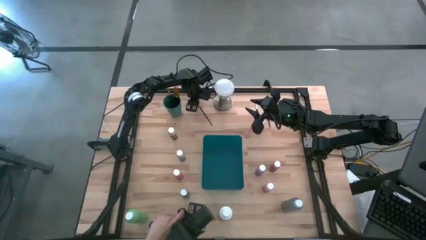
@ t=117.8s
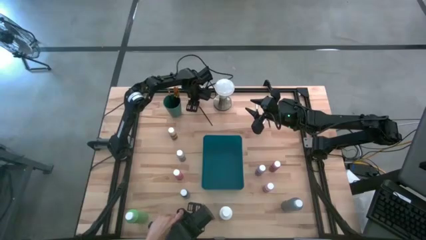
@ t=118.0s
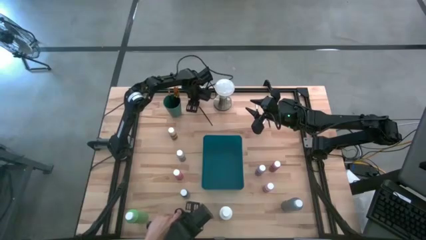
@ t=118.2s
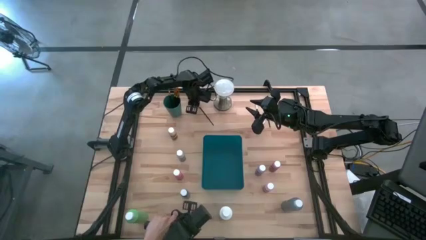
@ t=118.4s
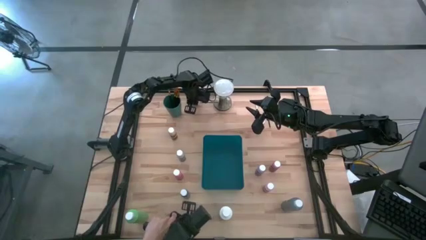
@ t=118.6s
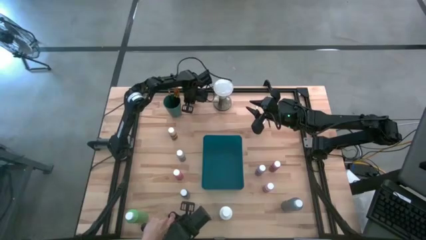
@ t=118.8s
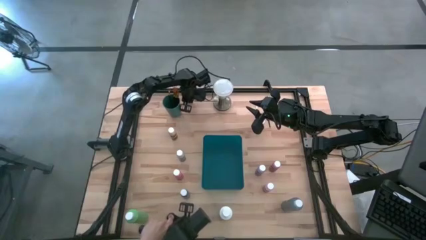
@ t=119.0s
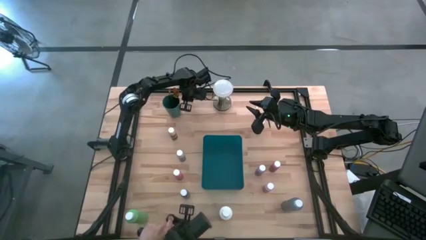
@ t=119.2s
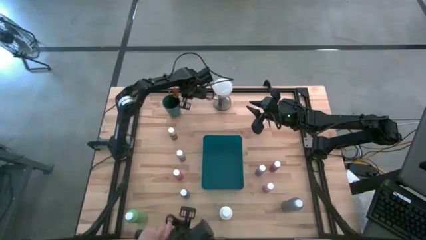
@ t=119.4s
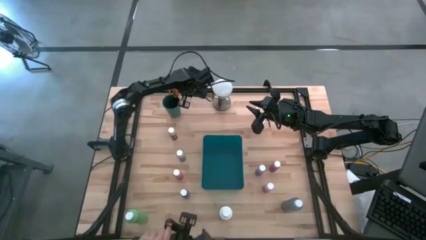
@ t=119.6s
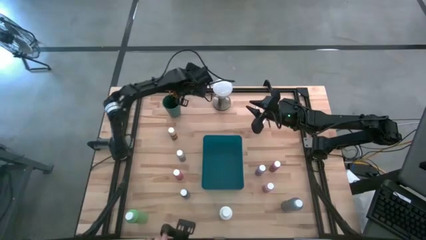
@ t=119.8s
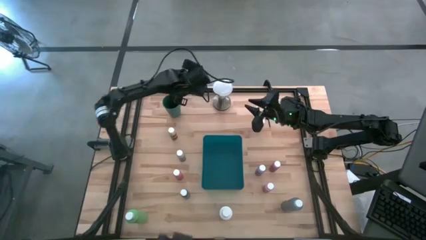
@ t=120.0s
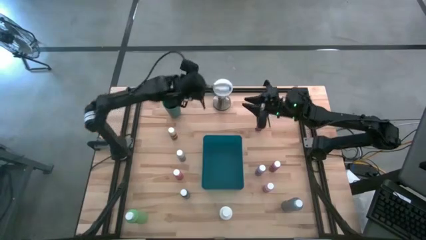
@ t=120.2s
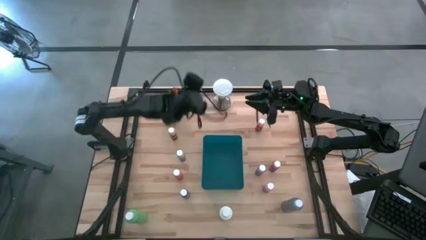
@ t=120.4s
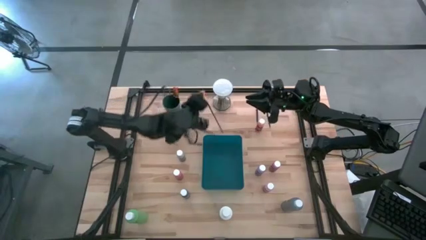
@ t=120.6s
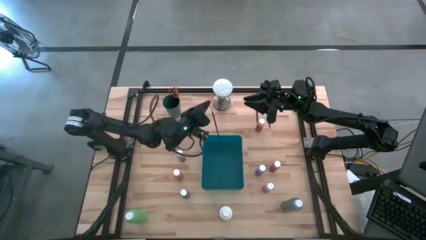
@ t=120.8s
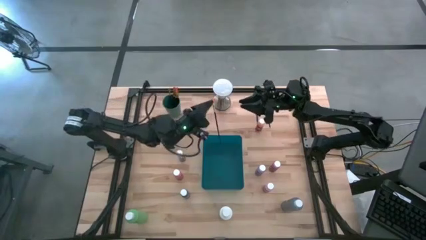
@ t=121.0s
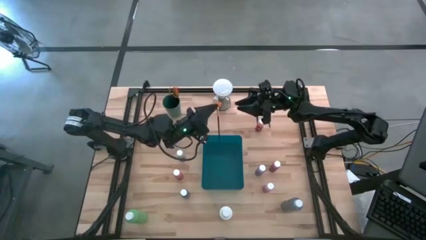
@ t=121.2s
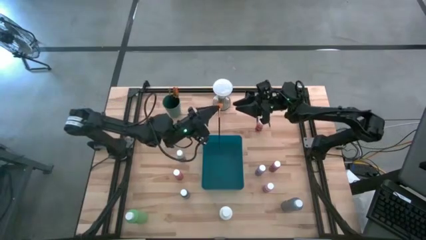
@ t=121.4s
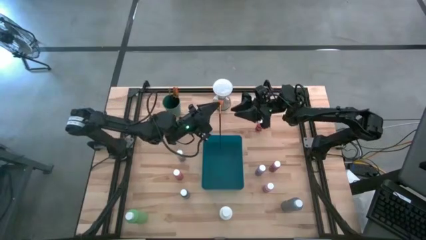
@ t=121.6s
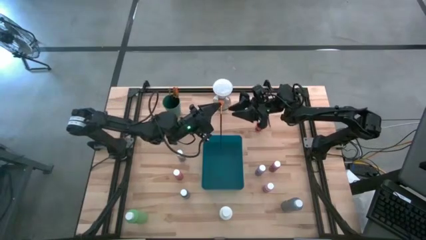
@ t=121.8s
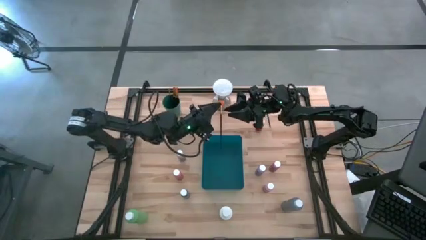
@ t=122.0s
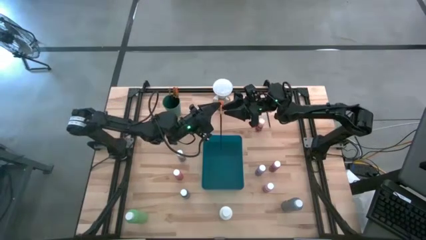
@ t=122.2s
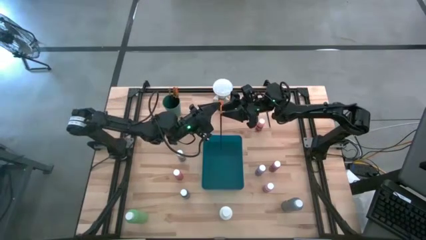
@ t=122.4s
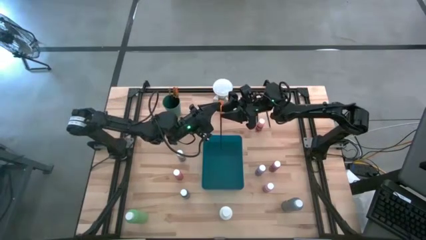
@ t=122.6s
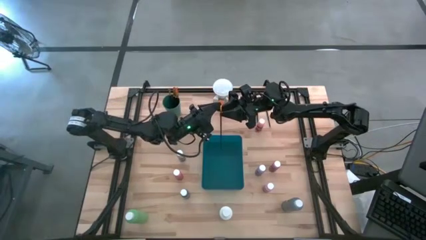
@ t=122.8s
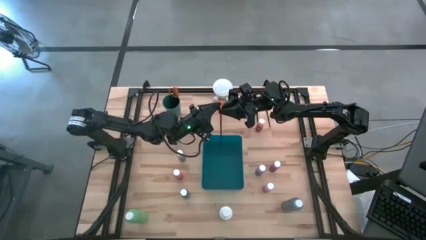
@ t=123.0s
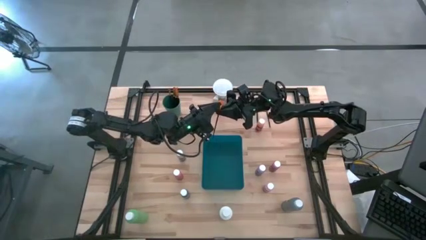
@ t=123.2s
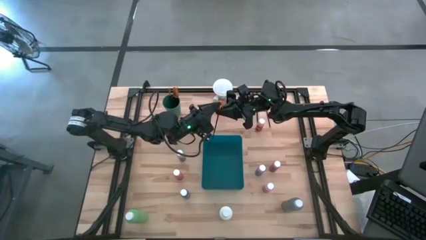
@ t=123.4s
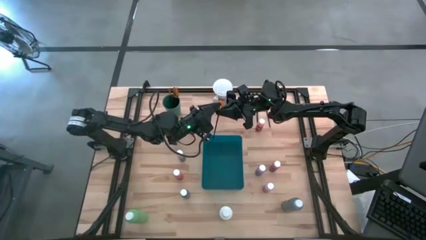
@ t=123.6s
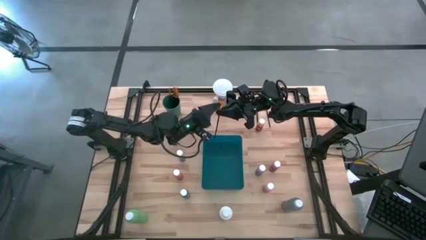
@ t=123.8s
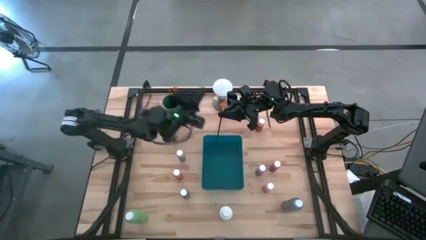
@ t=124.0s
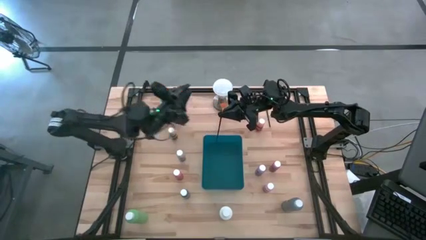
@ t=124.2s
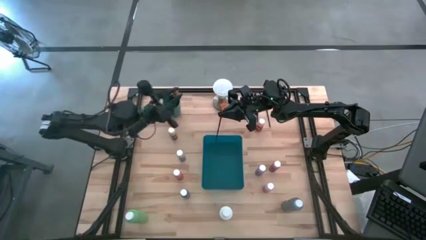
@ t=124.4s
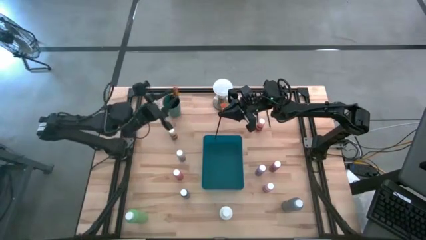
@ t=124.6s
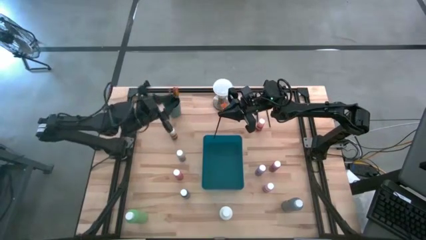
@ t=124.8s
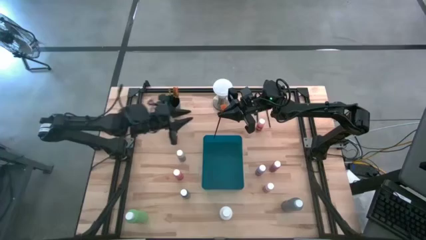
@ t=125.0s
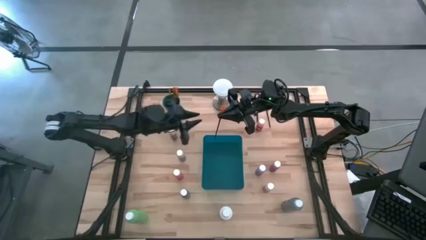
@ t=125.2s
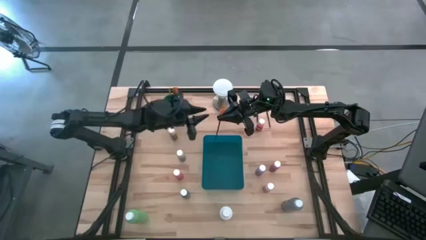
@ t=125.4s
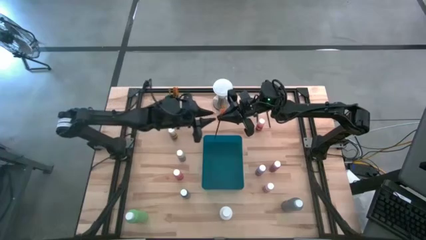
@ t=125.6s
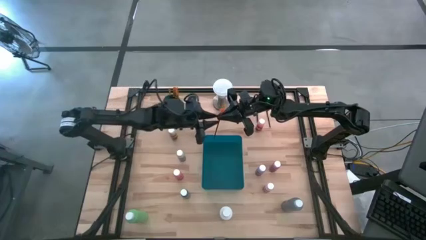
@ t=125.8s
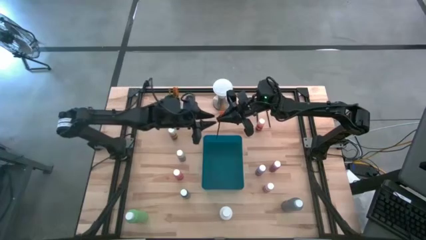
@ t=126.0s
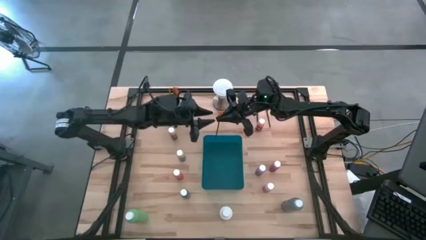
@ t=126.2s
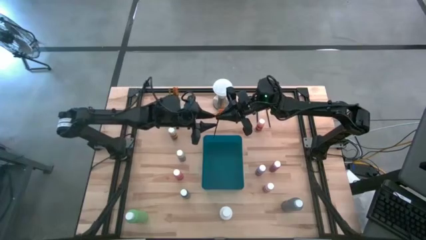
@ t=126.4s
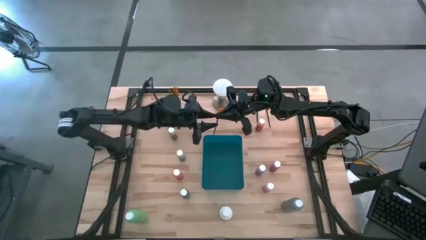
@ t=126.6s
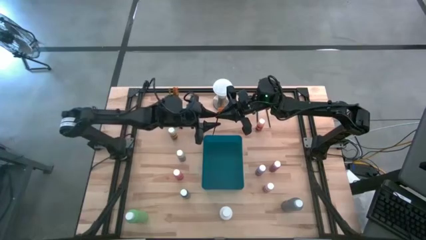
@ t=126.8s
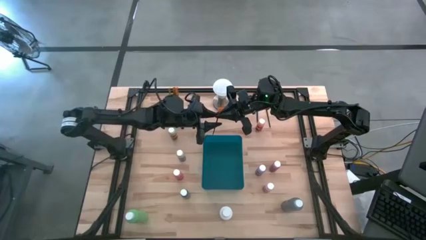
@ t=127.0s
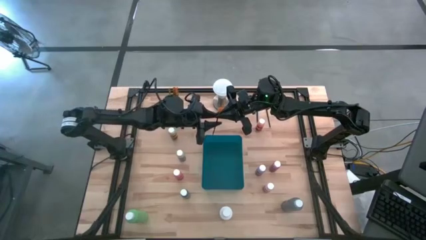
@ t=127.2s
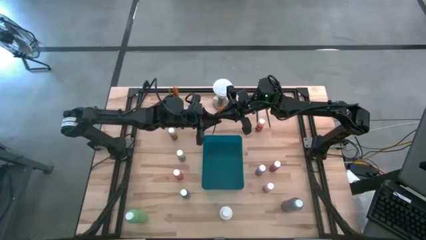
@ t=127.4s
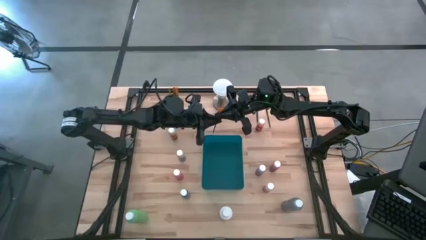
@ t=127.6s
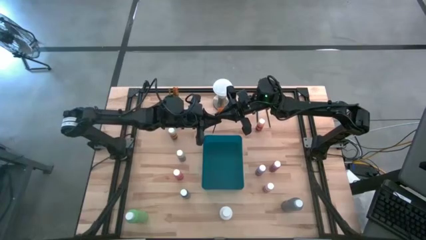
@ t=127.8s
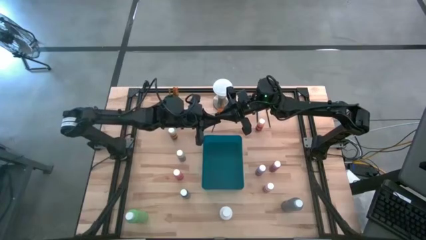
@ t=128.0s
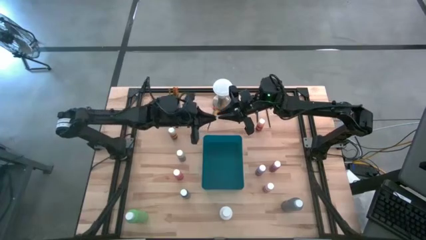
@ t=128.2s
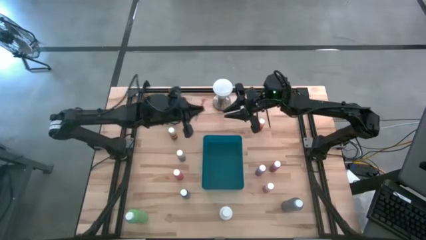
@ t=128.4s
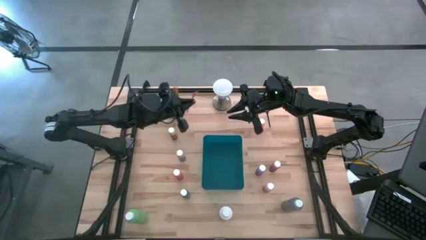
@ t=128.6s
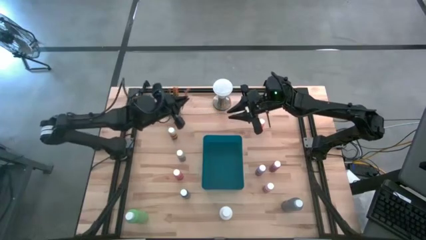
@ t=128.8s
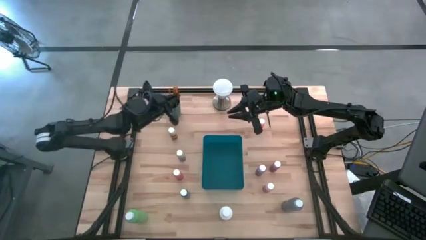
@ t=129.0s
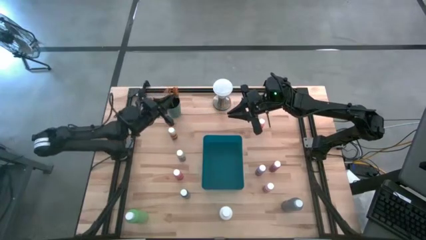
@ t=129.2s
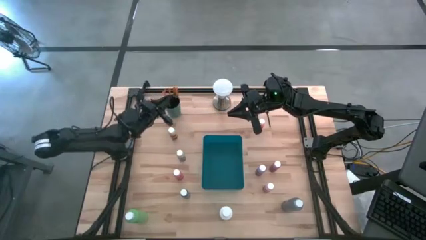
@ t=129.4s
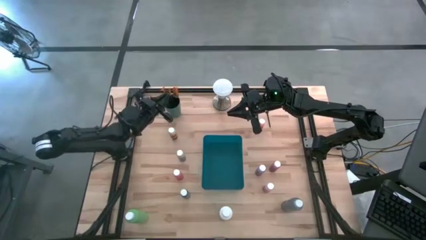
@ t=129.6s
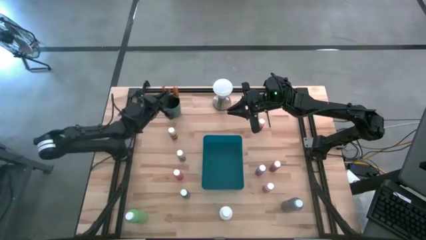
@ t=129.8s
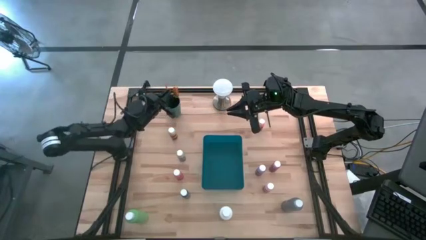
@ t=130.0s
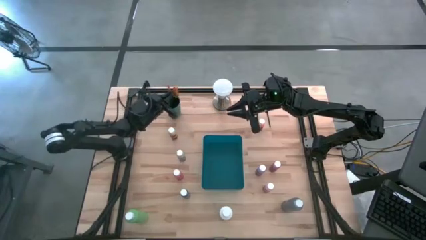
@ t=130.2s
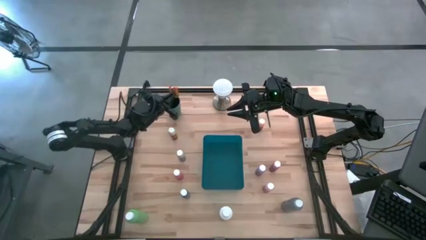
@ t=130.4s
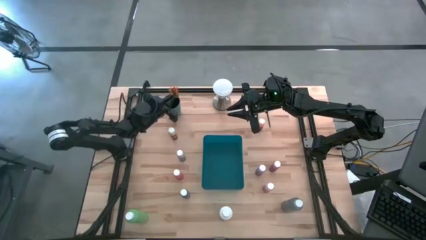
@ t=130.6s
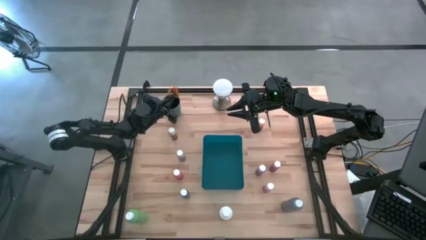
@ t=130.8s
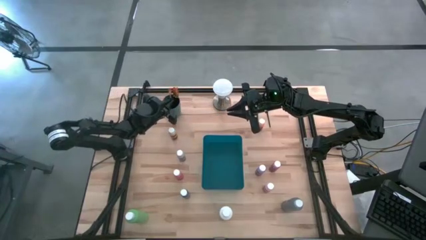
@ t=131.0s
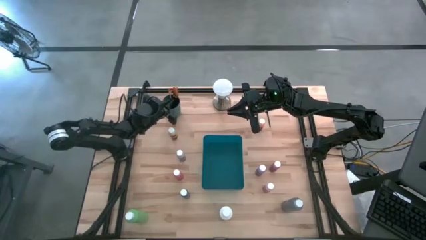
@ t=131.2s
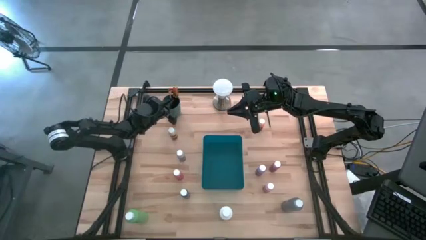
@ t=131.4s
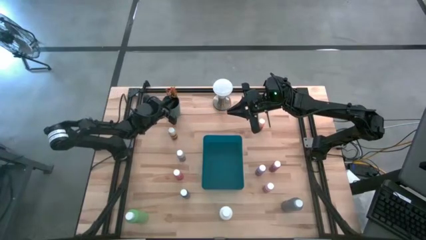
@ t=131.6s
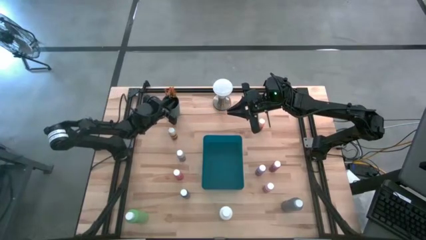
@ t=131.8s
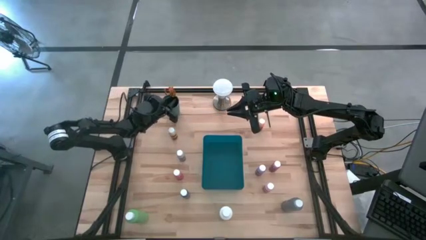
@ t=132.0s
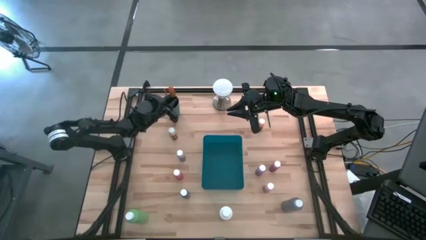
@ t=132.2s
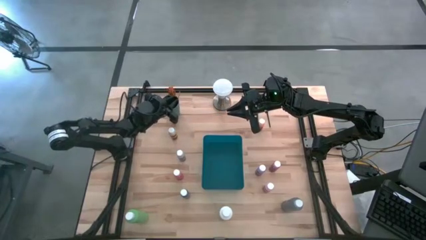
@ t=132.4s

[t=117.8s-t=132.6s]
Task: Pick & Place Paint Supplies
Put the yellow paint brush into the green cup

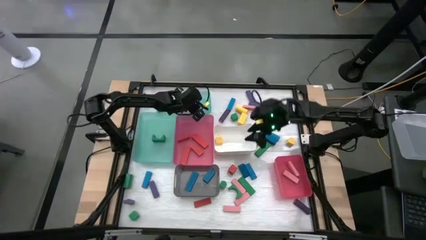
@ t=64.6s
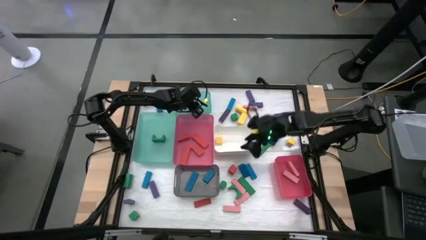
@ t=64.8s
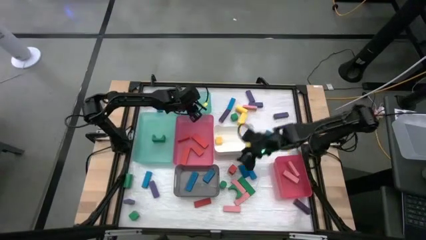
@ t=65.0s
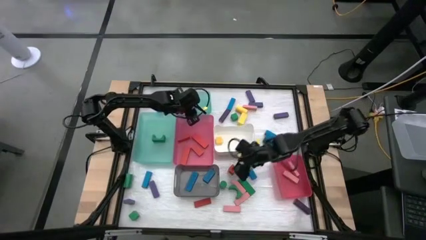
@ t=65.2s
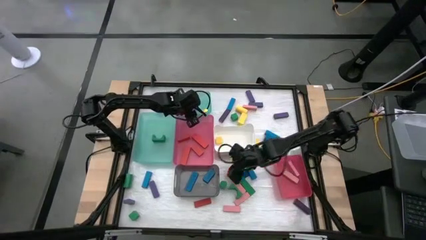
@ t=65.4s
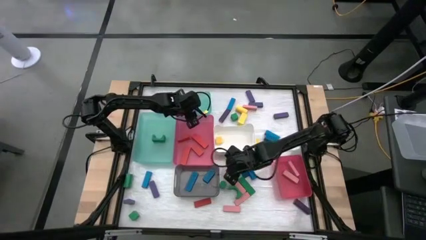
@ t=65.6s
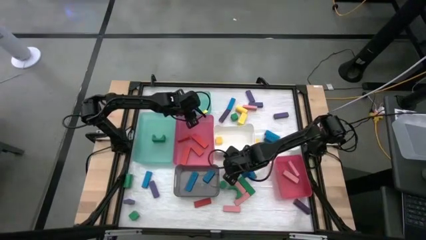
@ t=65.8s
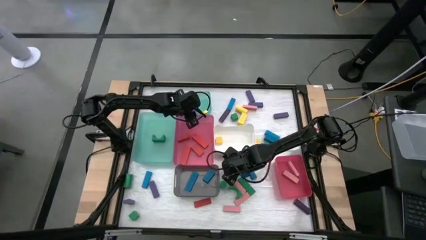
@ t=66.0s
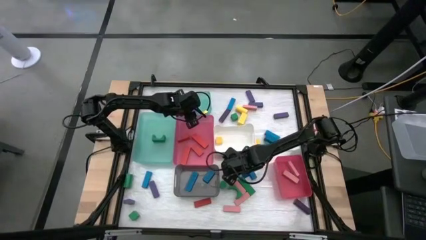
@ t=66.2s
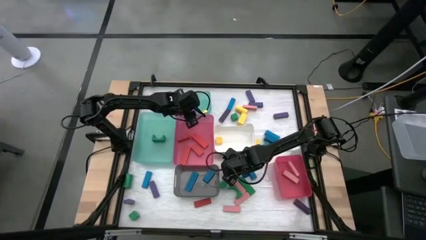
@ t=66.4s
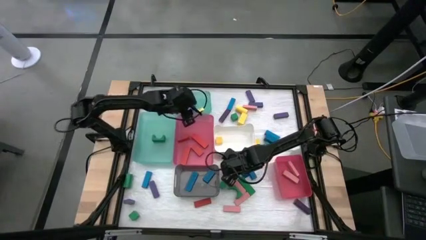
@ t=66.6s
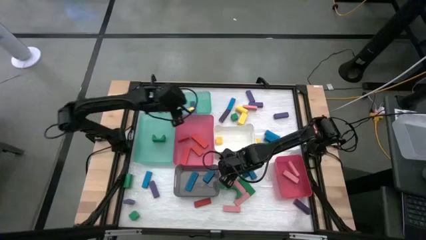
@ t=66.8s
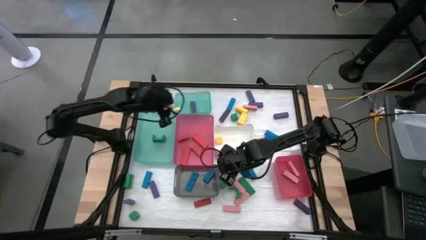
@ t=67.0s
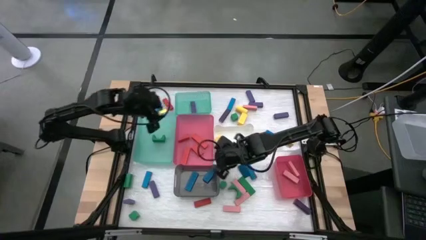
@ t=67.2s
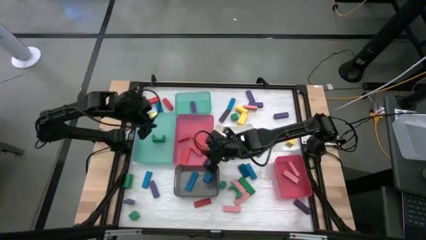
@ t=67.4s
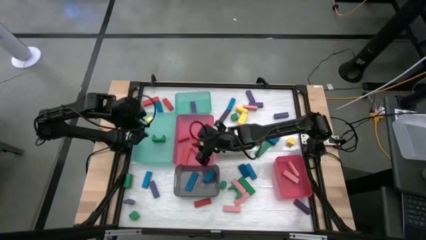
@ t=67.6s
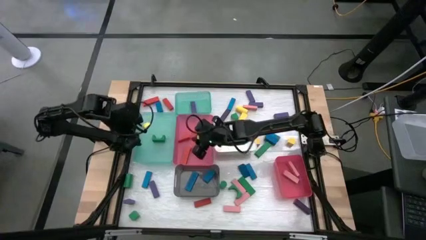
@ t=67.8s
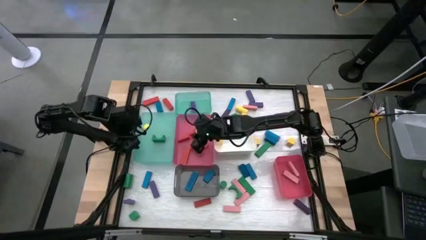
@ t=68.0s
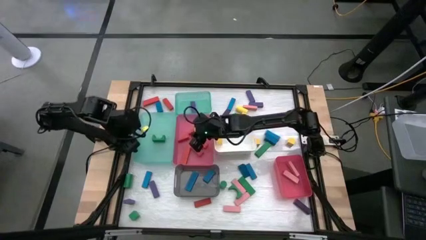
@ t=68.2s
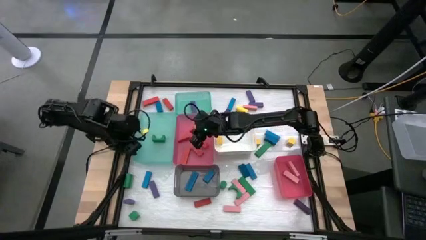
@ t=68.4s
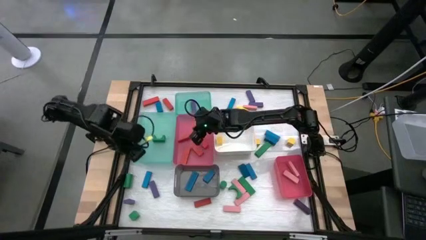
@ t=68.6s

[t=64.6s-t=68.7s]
Task: Sort blocks
Put the red block into the top pink bin
